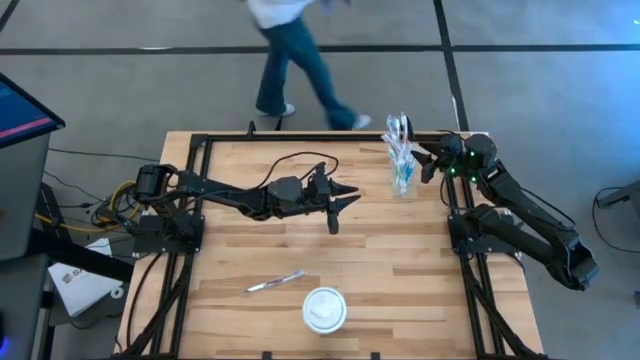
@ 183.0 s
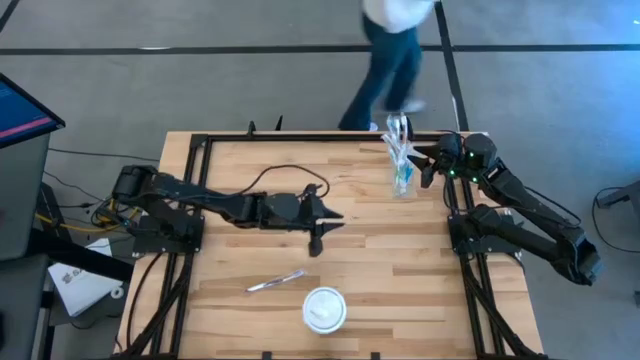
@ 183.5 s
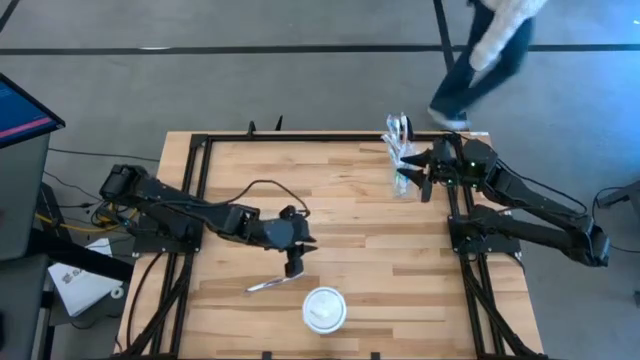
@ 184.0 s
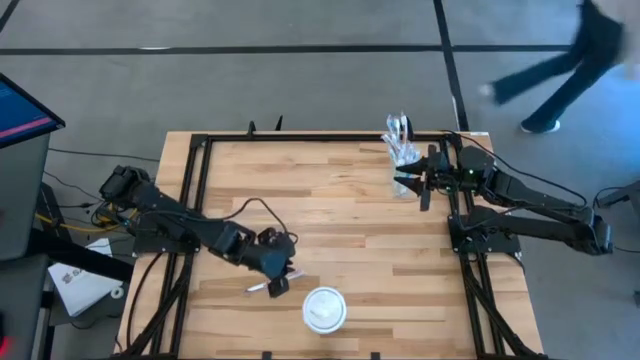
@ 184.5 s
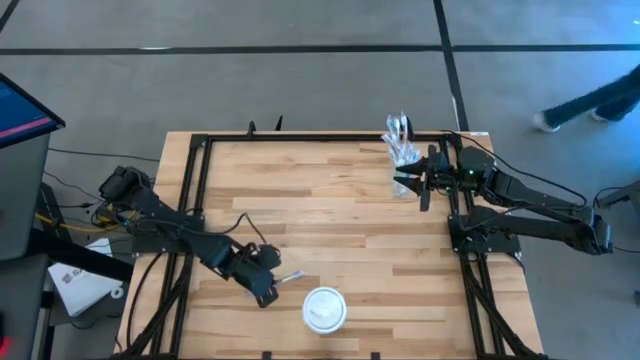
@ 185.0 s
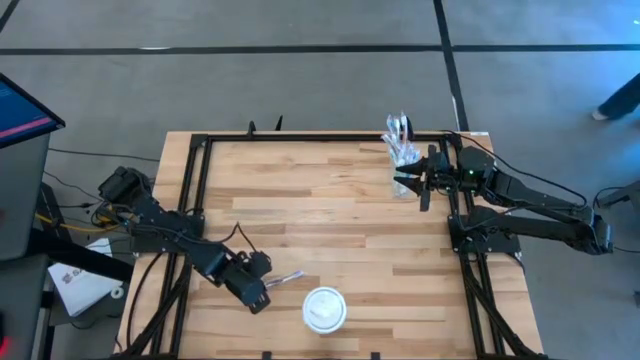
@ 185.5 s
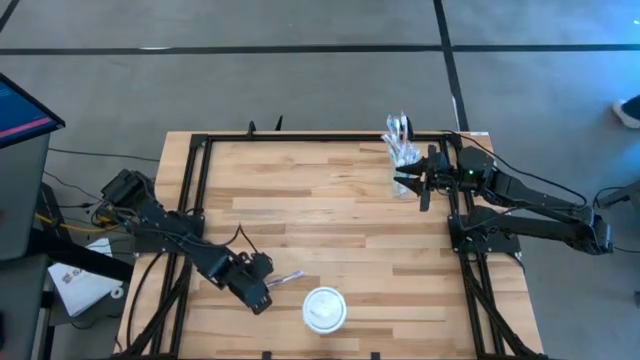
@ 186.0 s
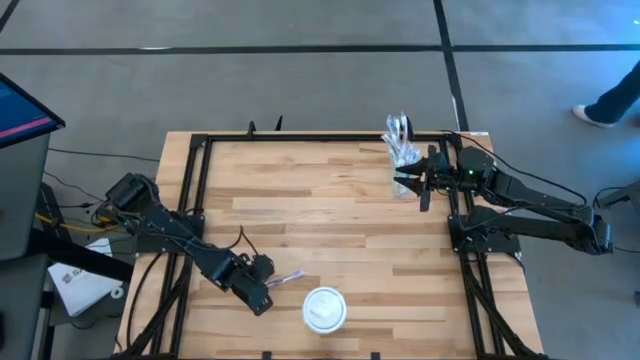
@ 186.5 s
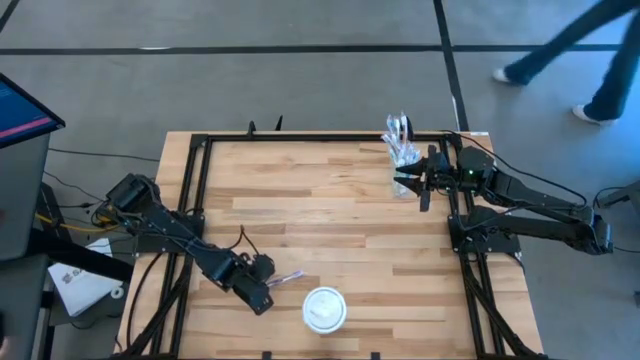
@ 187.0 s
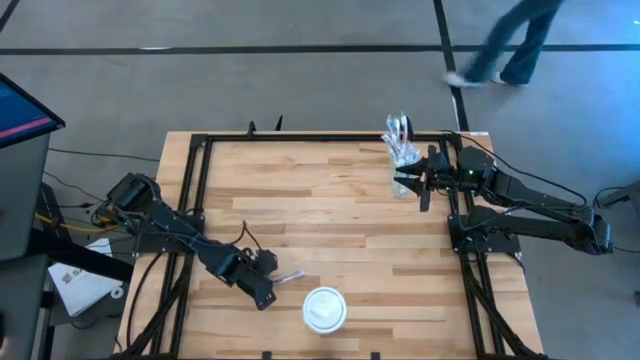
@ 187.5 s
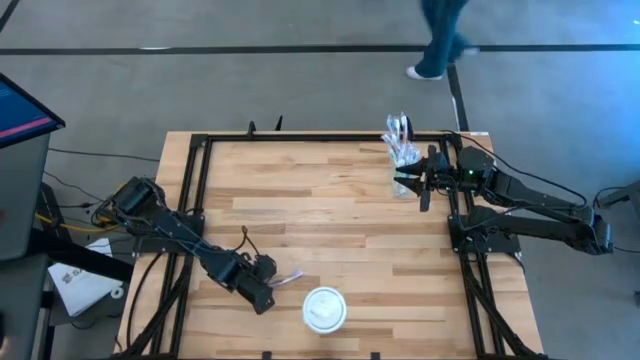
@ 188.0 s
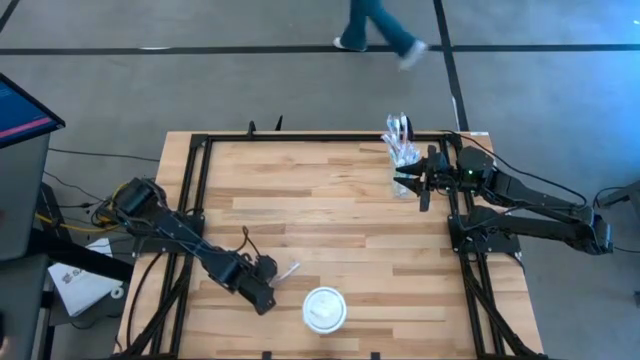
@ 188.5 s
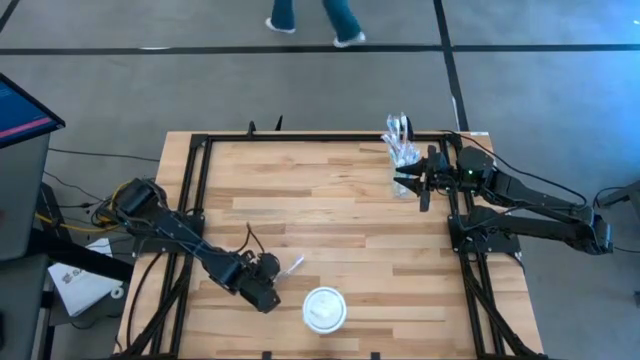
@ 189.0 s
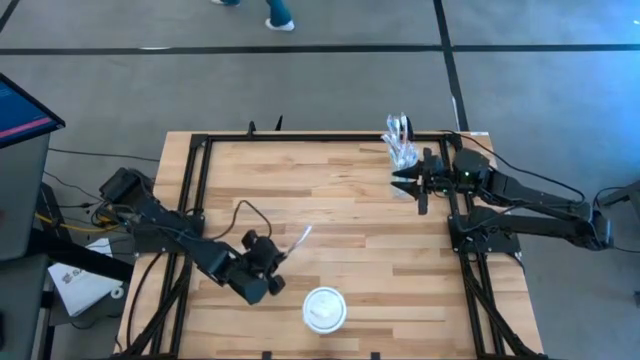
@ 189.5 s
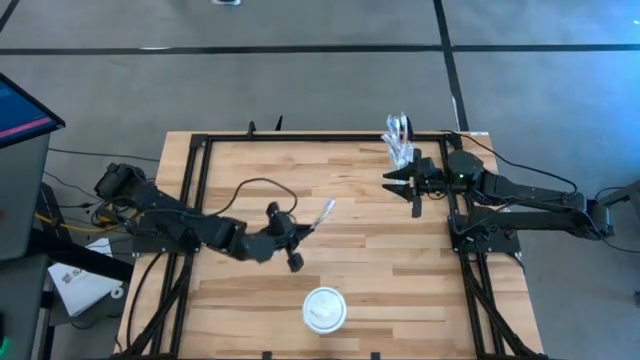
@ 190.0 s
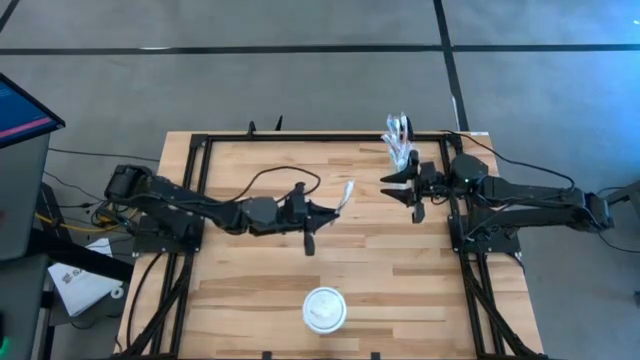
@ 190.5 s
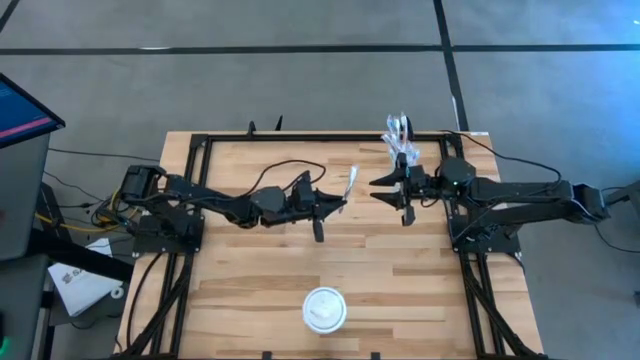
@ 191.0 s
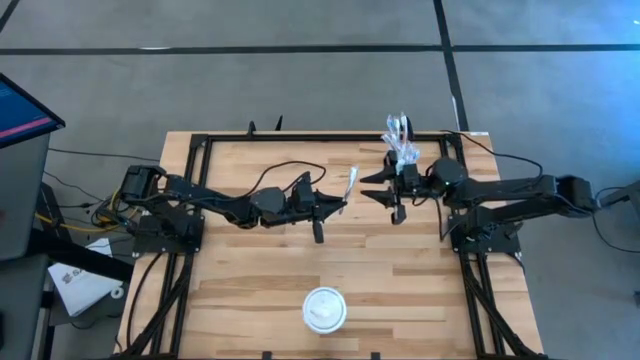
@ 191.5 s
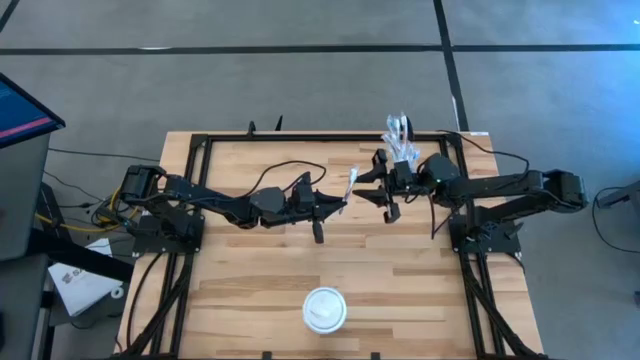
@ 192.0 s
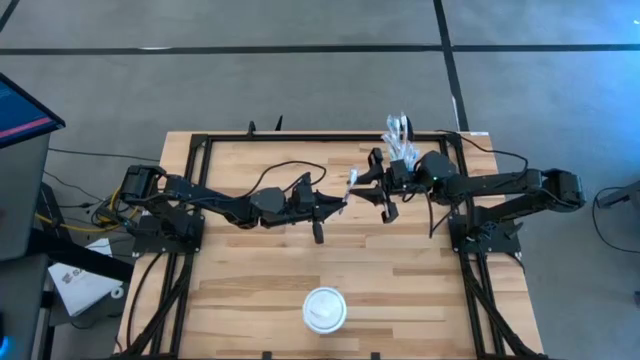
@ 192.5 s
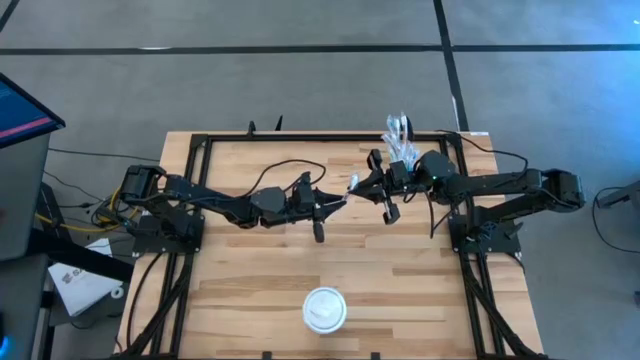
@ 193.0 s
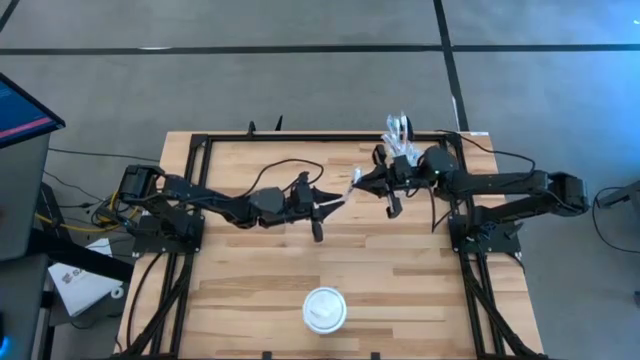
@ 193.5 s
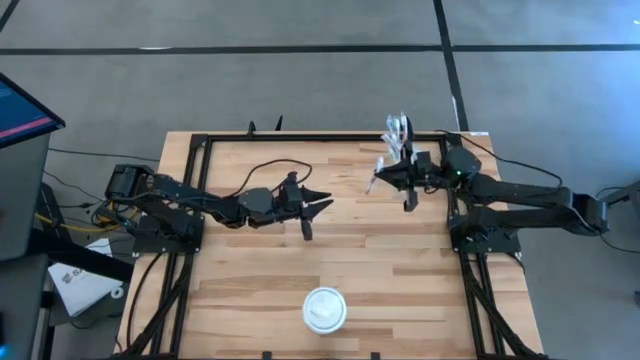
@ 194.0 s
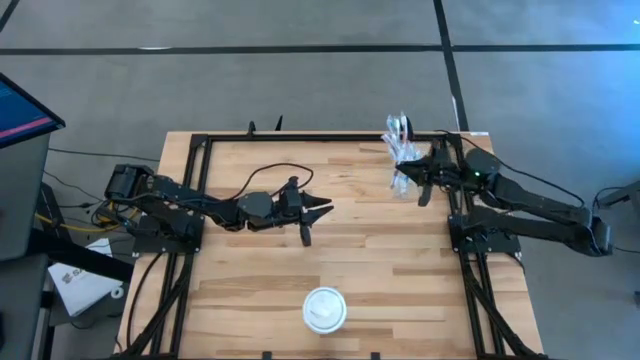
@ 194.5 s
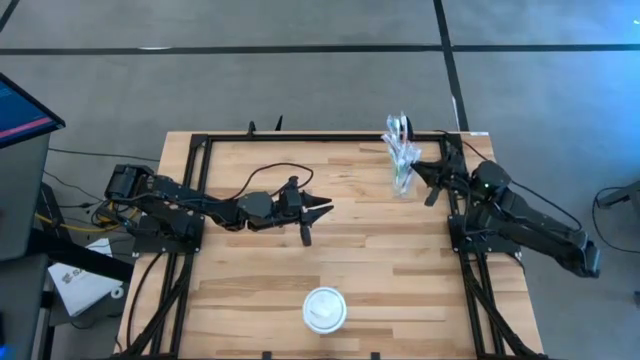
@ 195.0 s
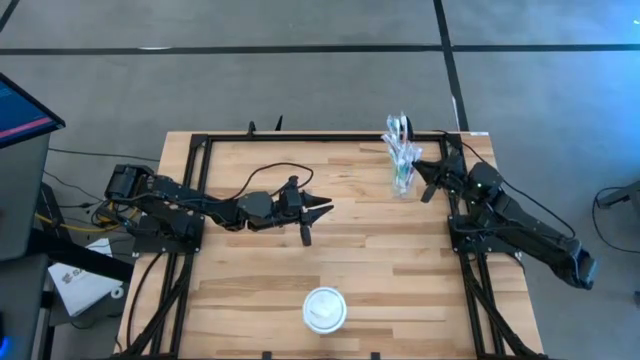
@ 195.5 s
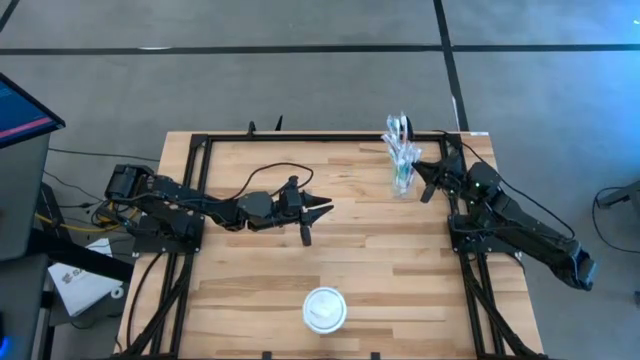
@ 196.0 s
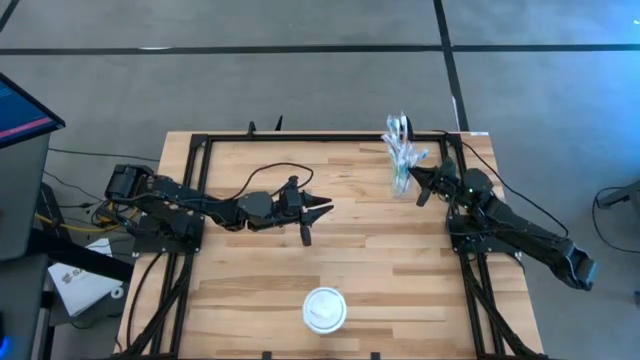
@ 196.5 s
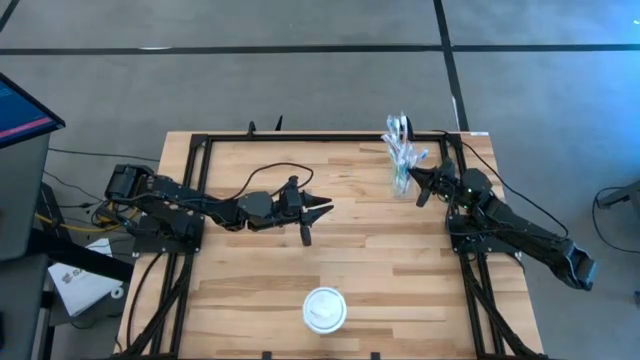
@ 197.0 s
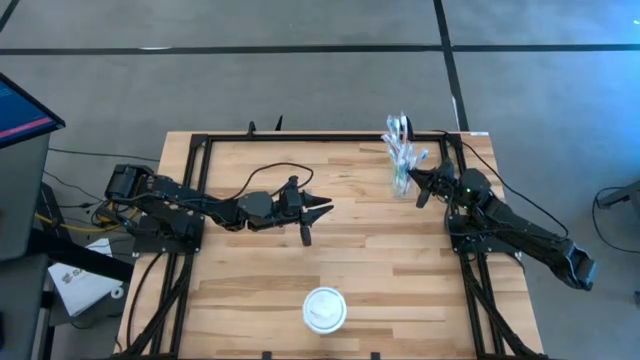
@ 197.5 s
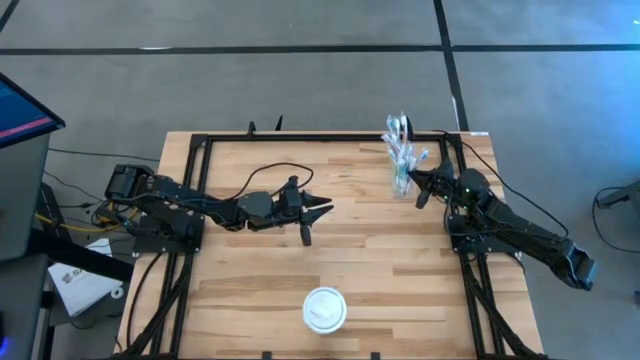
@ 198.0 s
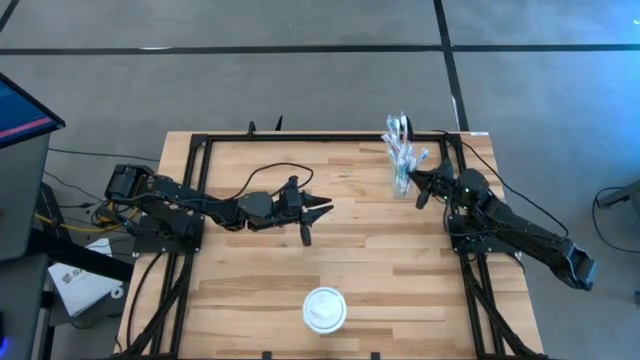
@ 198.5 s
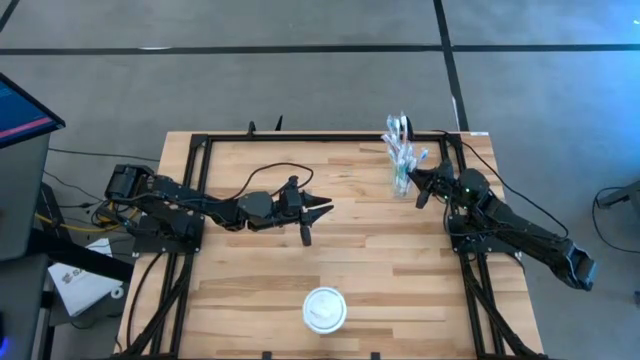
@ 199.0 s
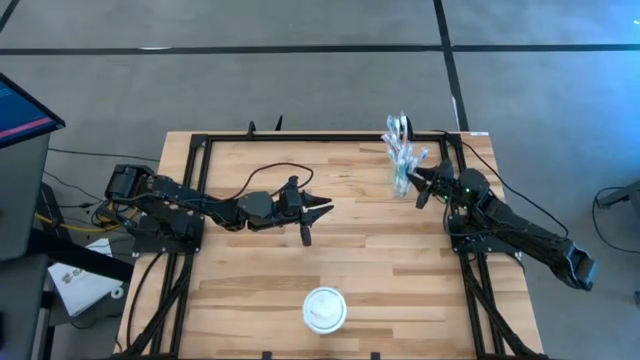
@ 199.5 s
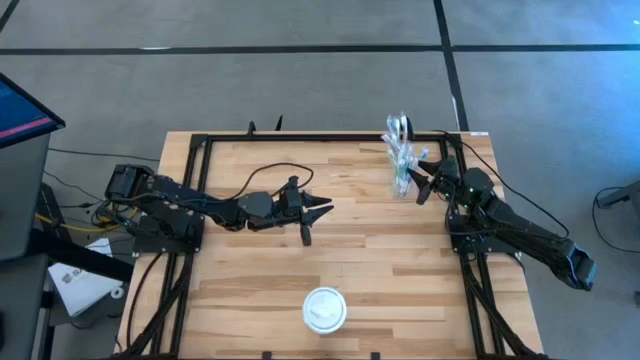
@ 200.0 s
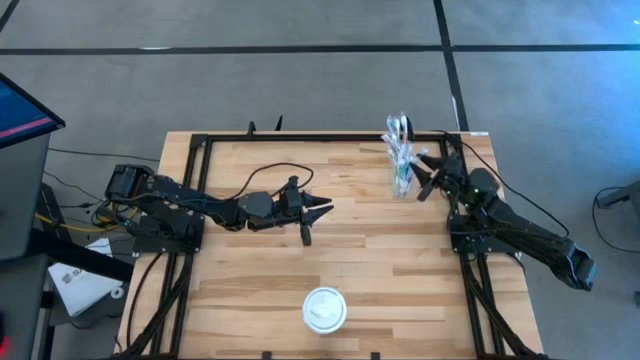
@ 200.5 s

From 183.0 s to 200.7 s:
Task: Pick & Place toothbrushing station
Put the purple toothbrush into the transparent organizer

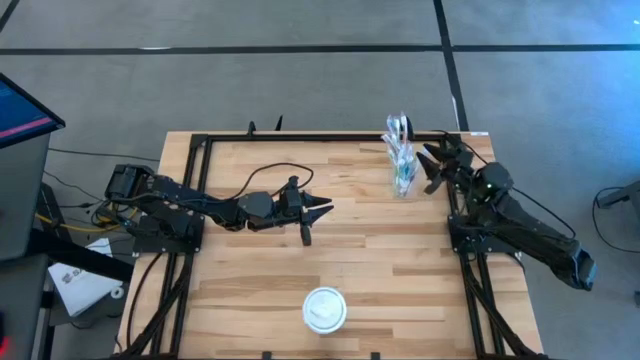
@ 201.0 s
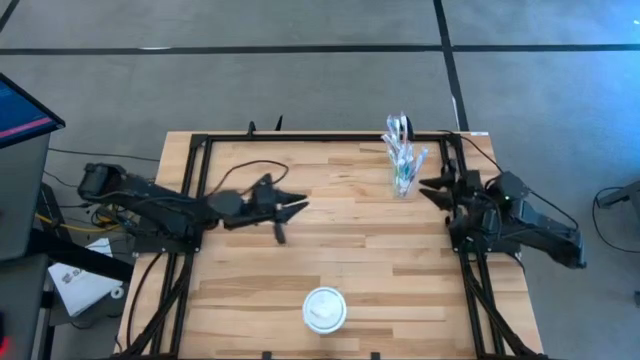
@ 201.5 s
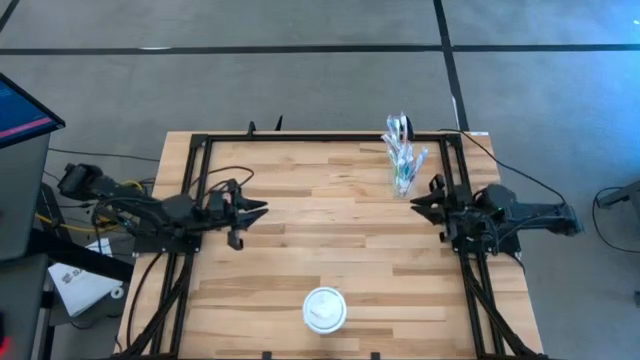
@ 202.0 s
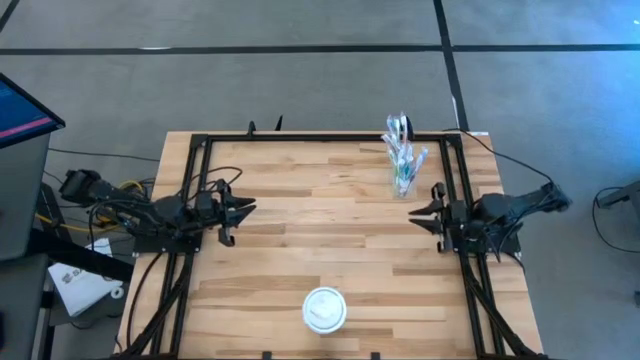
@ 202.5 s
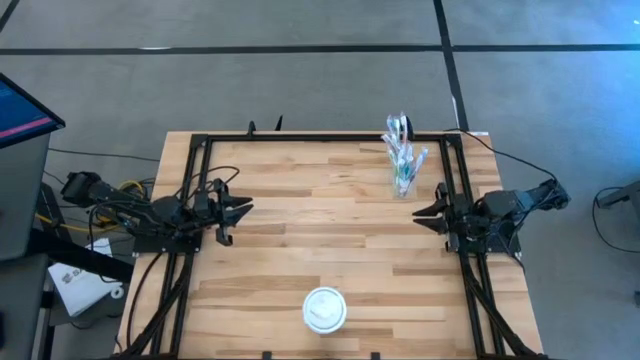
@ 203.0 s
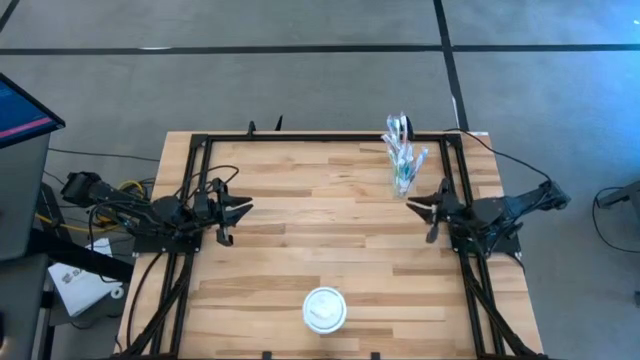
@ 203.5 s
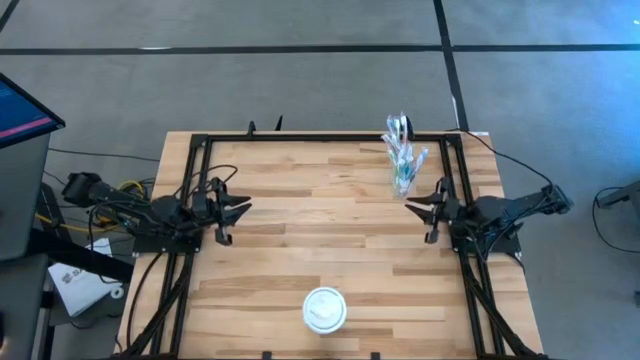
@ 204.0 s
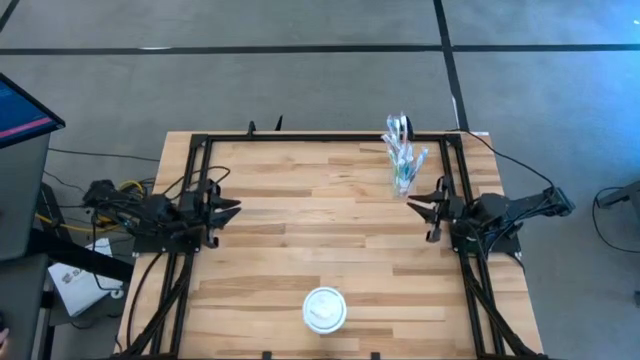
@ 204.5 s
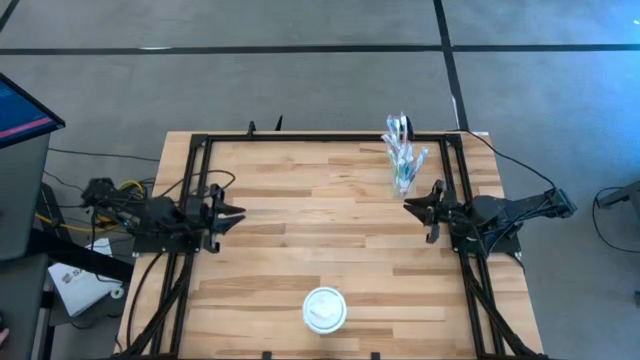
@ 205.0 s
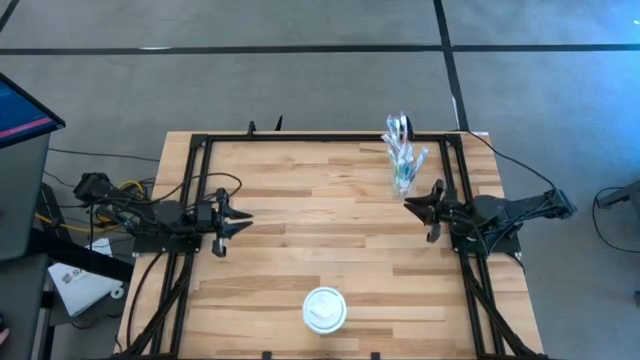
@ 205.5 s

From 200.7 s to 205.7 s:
Return to Home Position
